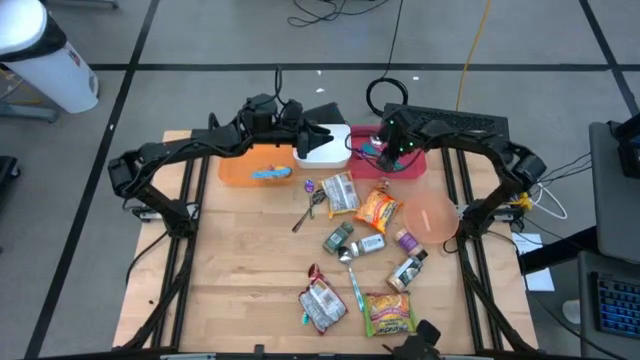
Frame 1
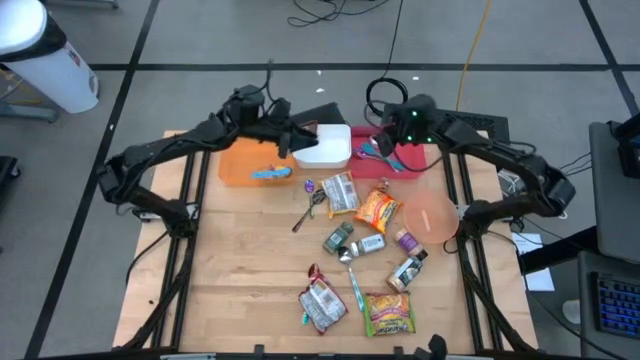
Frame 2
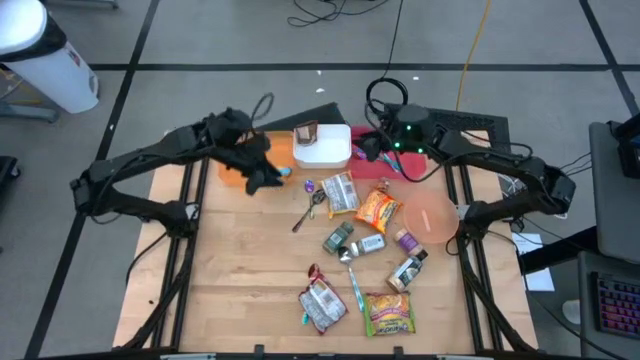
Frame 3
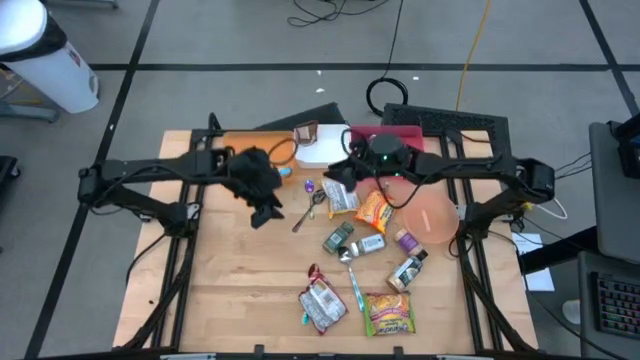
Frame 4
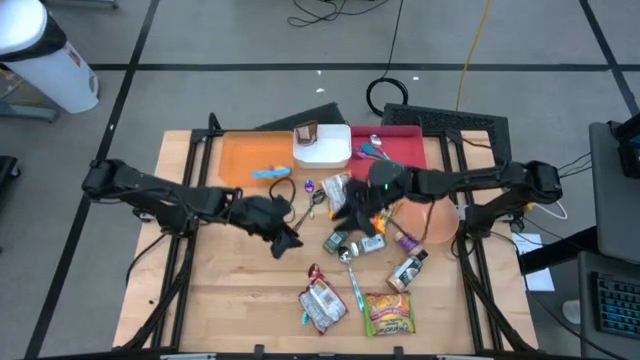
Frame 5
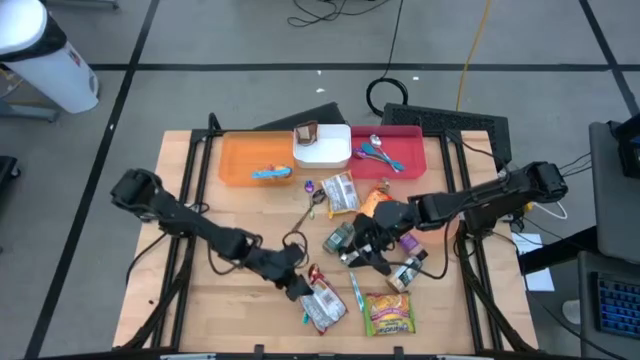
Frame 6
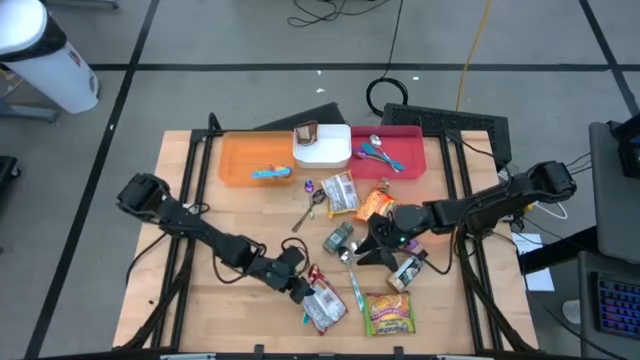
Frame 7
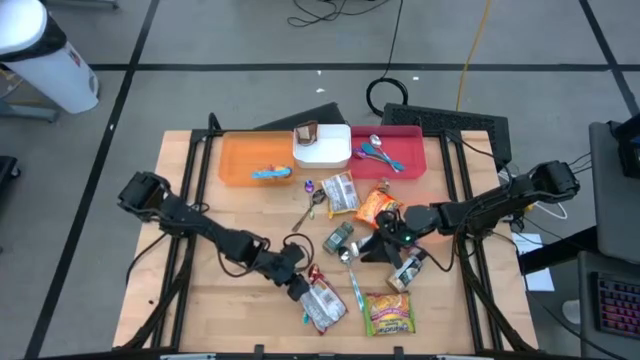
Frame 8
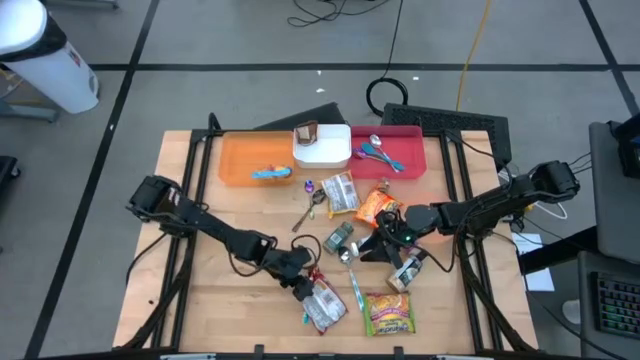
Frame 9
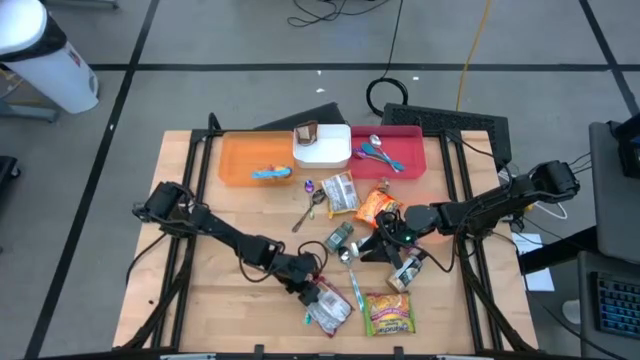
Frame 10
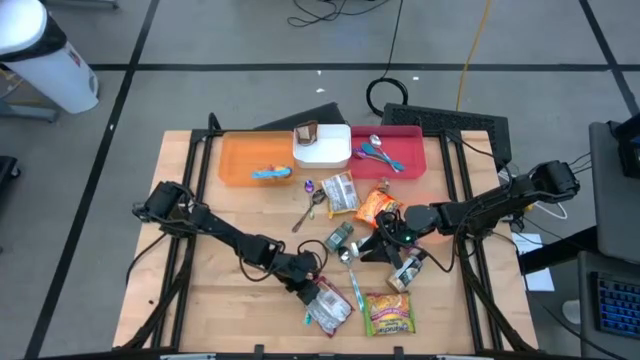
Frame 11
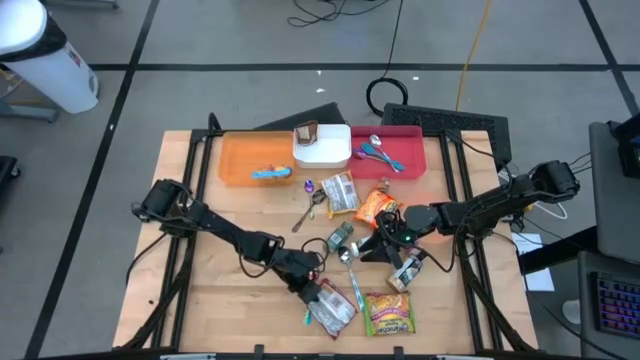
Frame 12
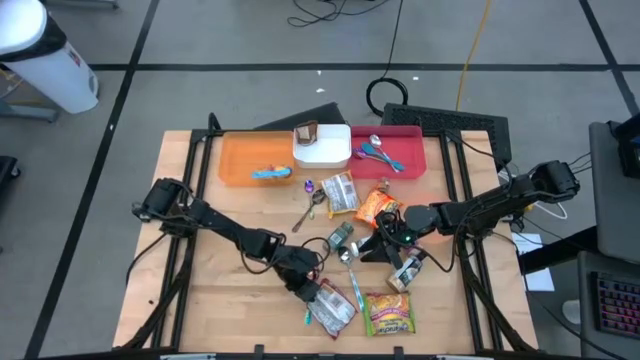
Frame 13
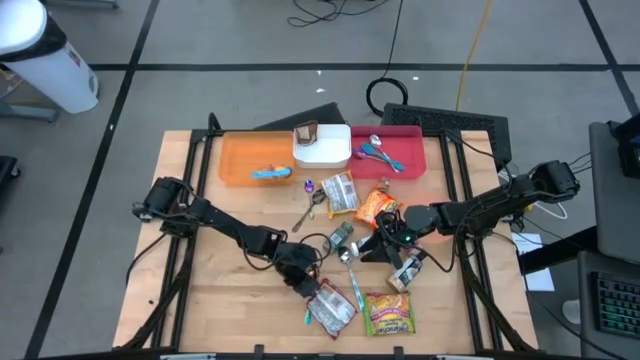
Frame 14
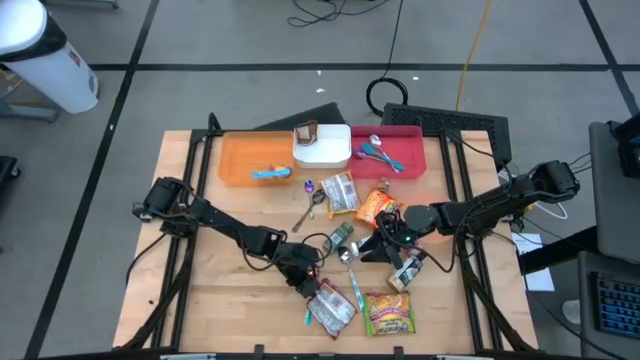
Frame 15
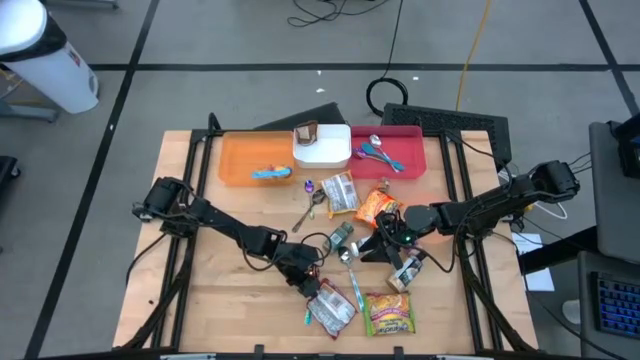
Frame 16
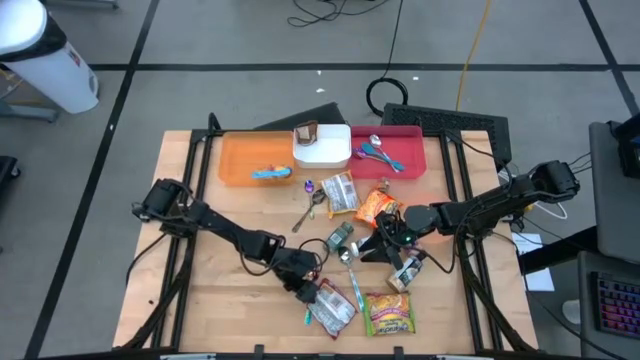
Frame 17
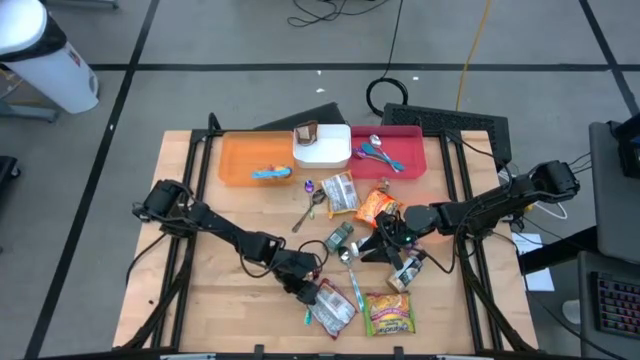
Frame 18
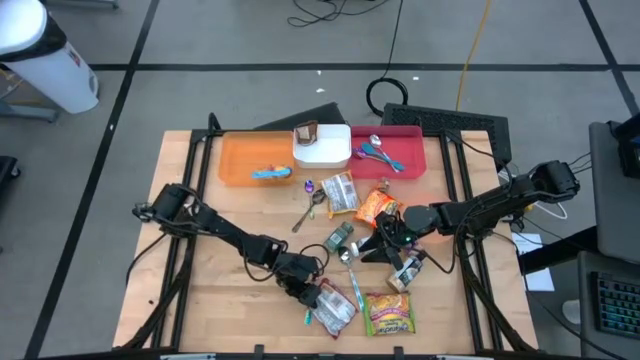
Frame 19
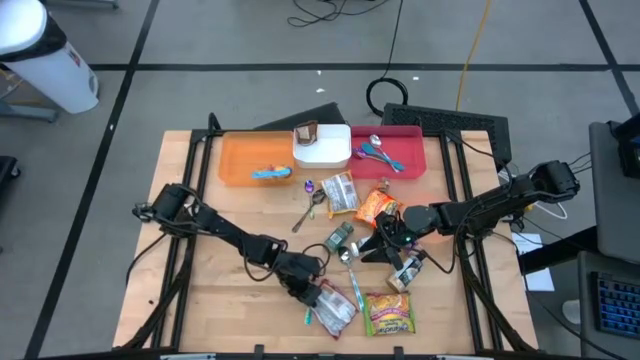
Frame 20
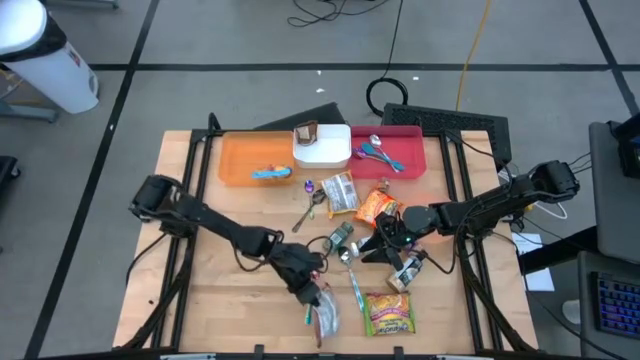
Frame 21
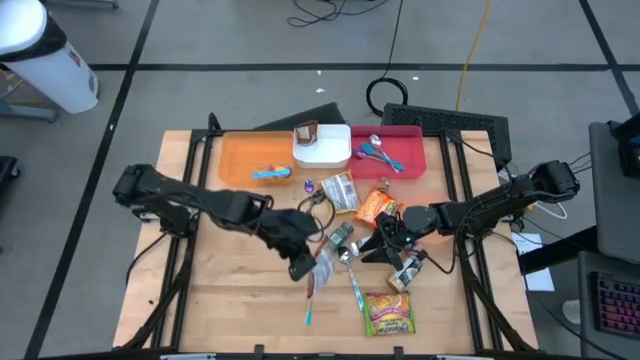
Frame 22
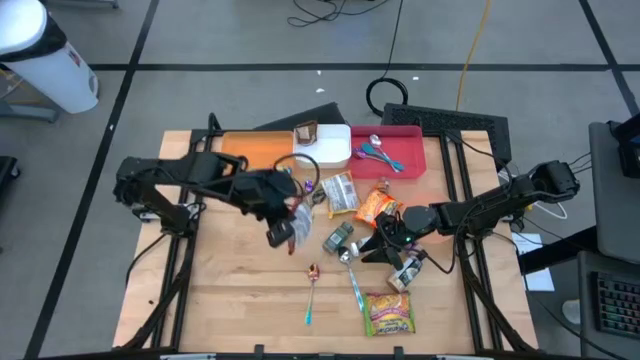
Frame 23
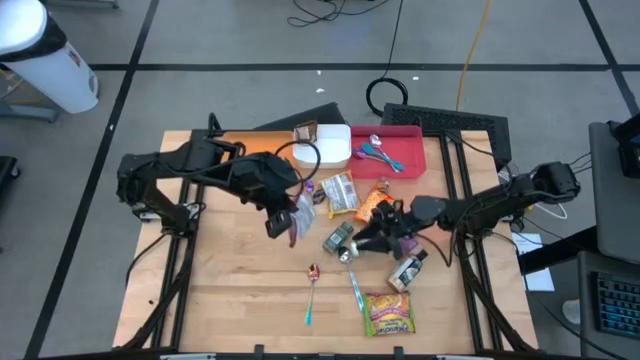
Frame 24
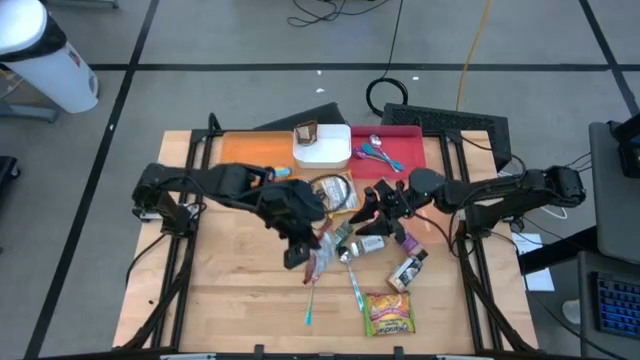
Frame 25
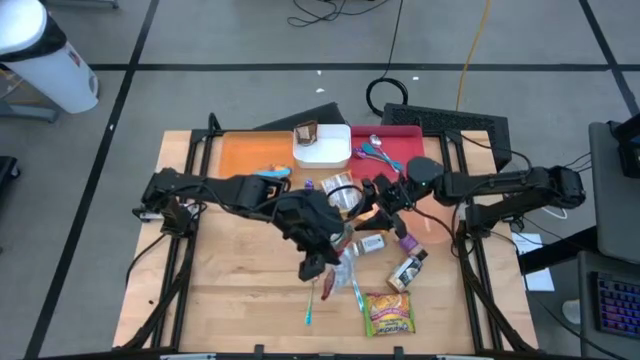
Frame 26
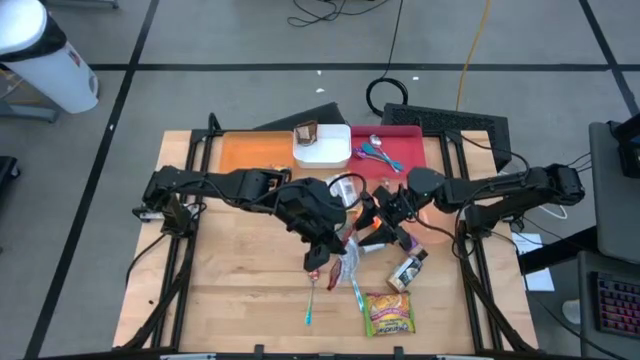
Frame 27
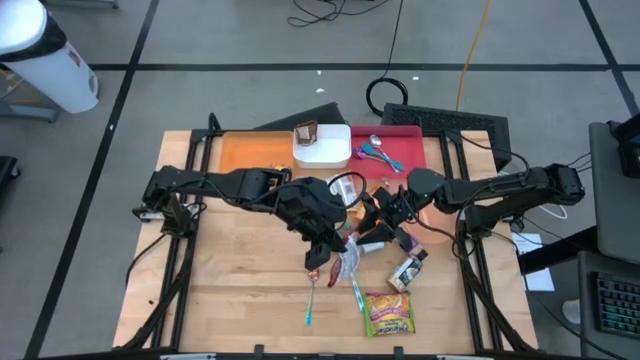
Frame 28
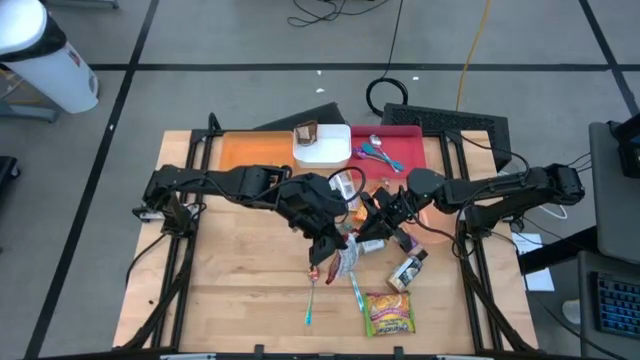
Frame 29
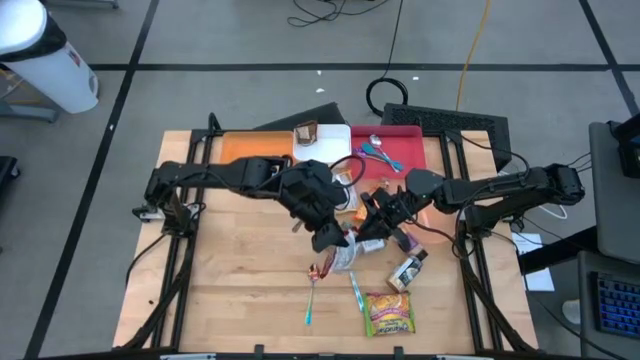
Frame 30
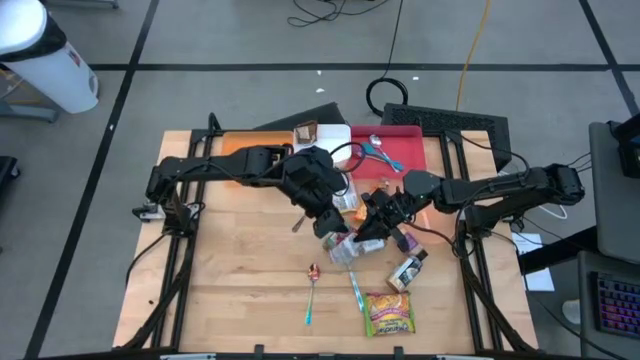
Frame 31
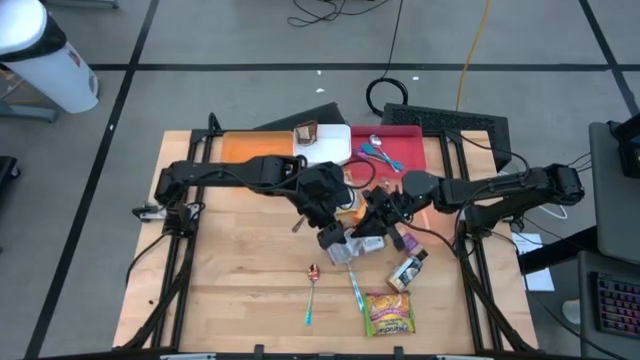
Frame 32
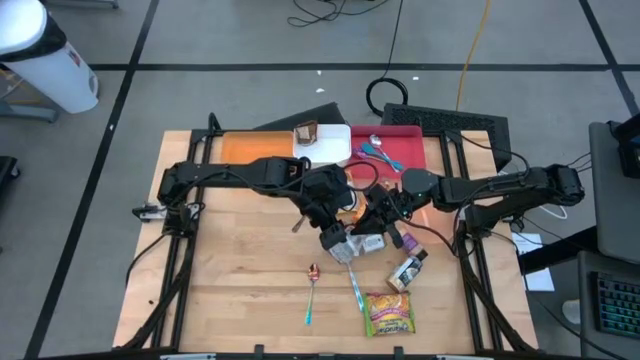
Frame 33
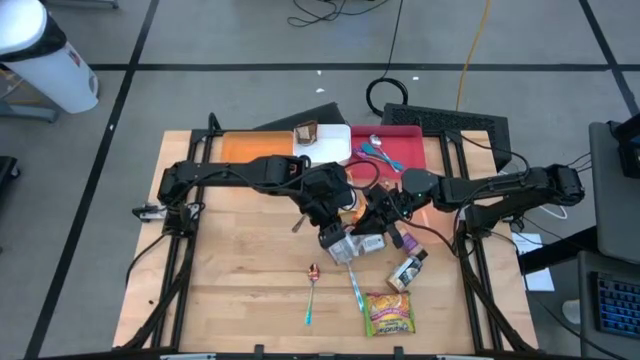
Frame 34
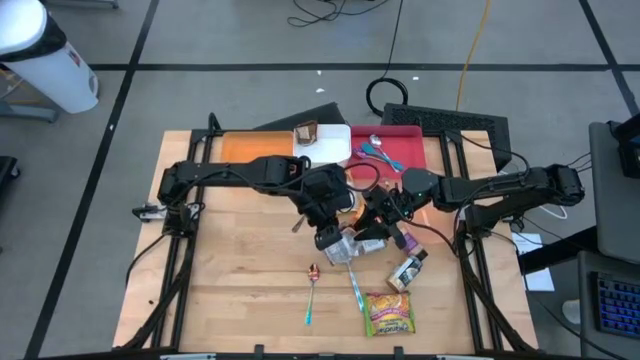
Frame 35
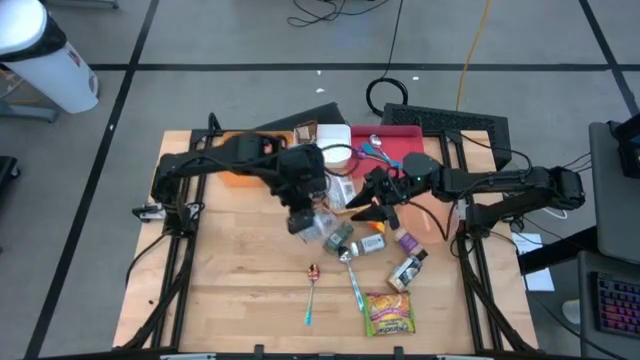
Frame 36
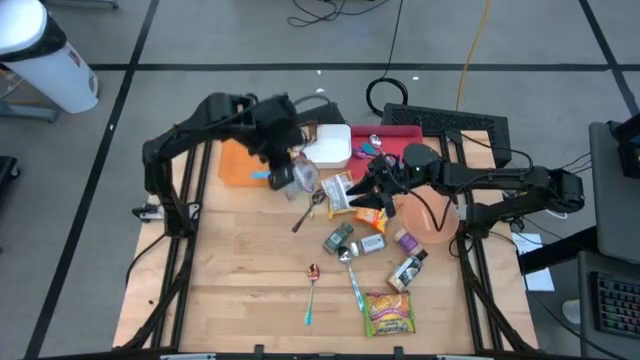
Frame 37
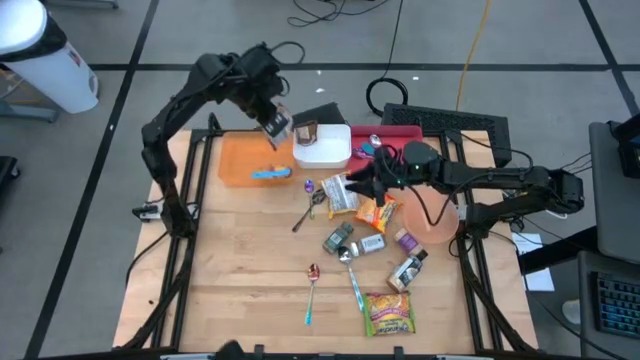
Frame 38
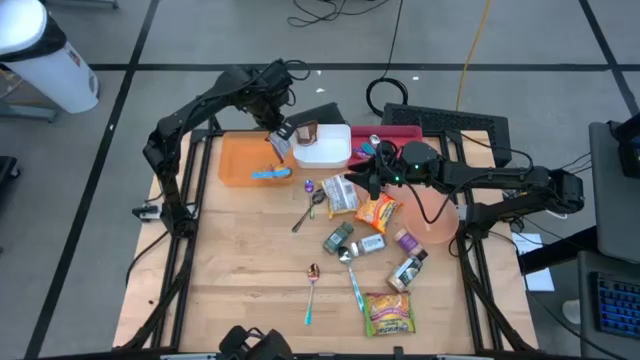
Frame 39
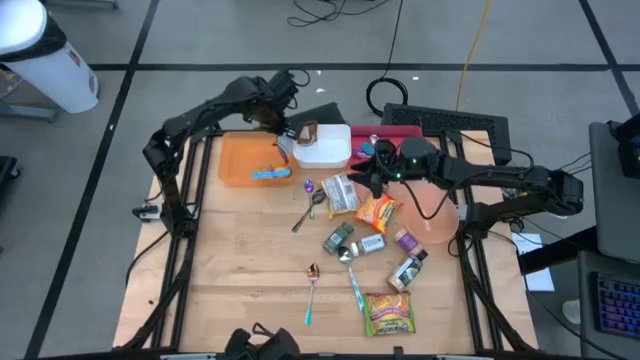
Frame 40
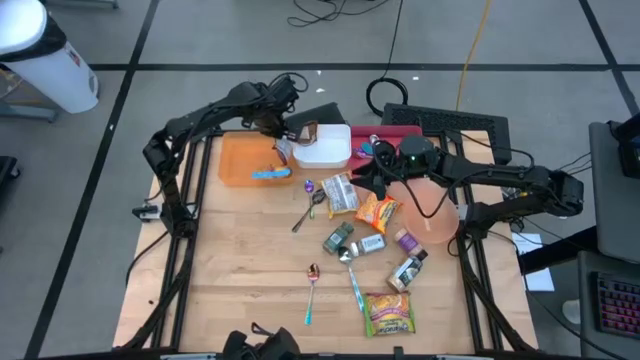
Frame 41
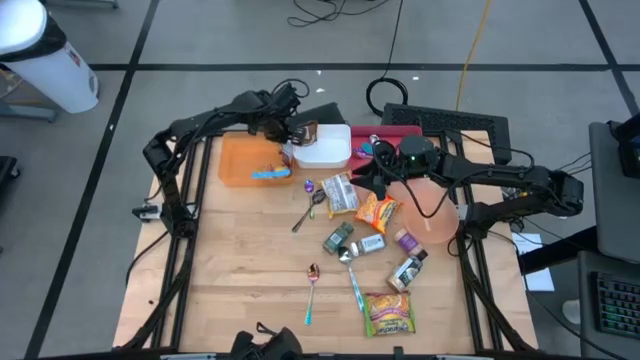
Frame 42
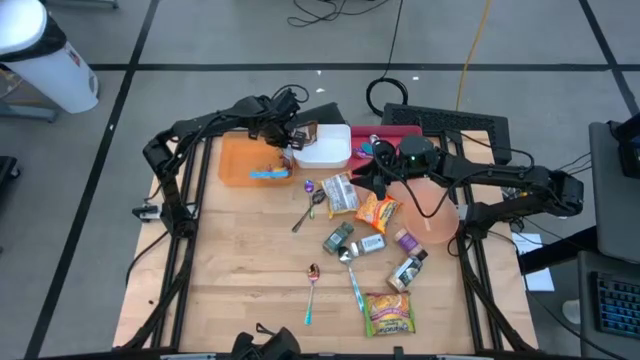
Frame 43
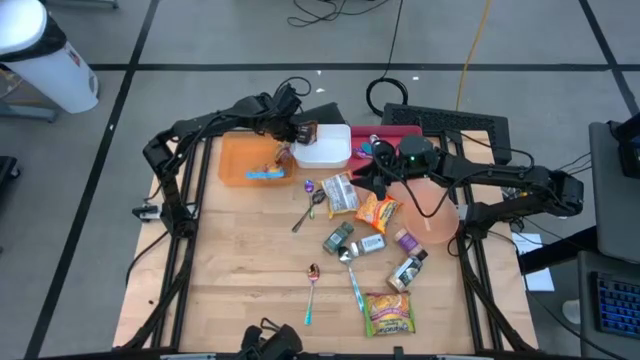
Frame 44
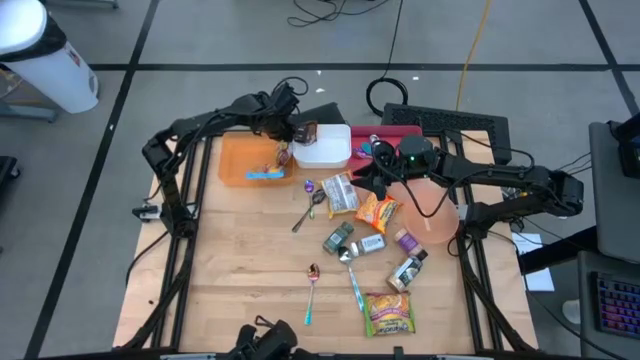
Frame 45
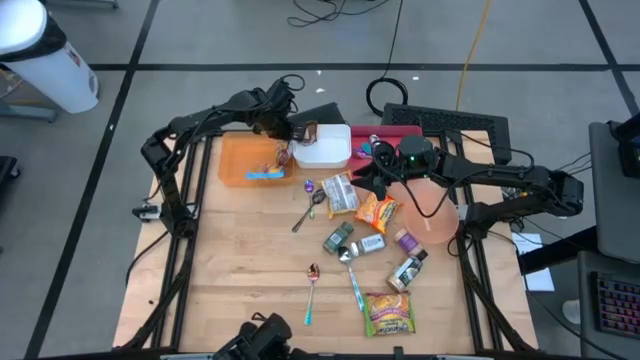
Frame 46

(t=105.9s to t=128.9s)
Task: Pick & Place Food Item
Put the red noodle pack into the orange bin
